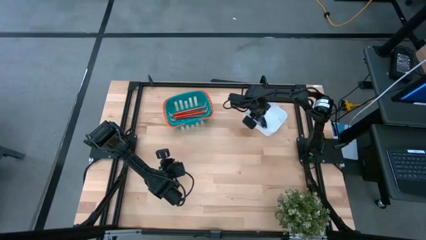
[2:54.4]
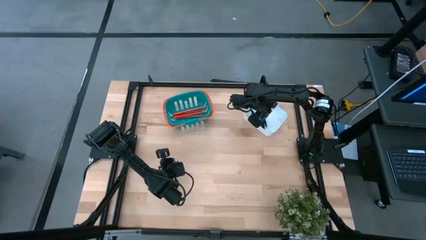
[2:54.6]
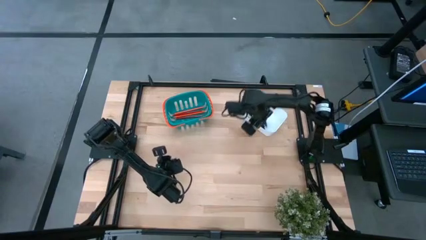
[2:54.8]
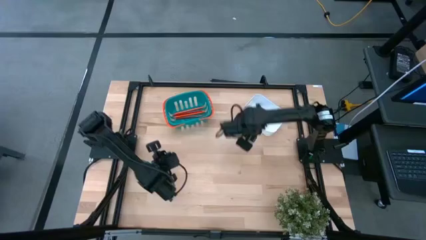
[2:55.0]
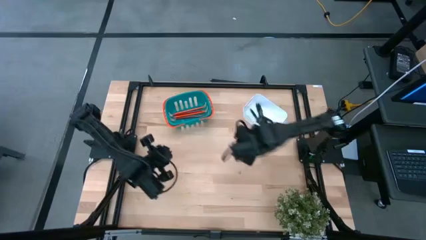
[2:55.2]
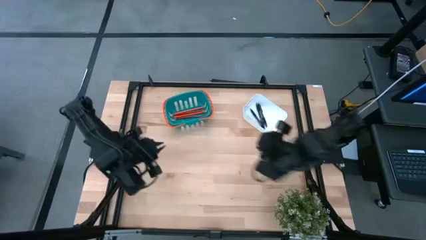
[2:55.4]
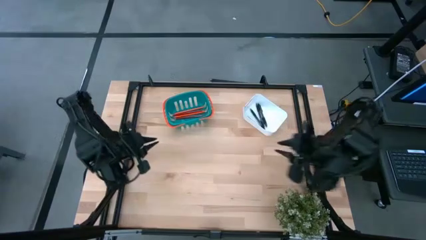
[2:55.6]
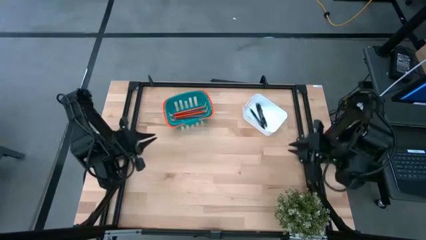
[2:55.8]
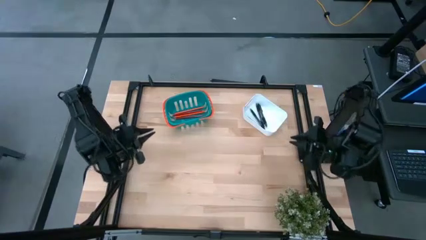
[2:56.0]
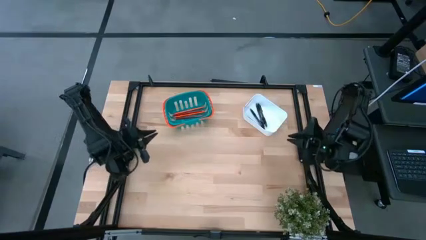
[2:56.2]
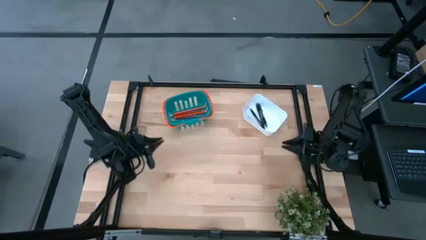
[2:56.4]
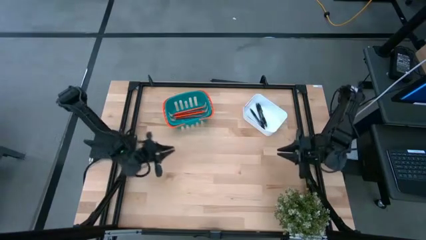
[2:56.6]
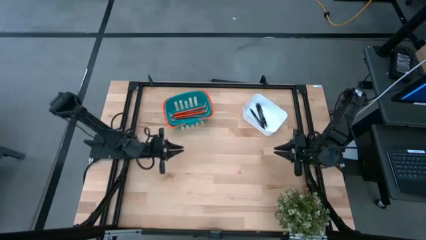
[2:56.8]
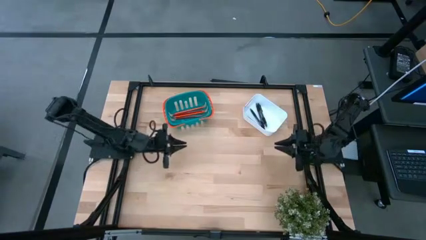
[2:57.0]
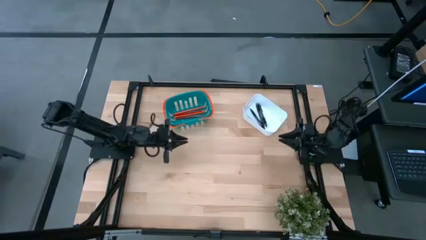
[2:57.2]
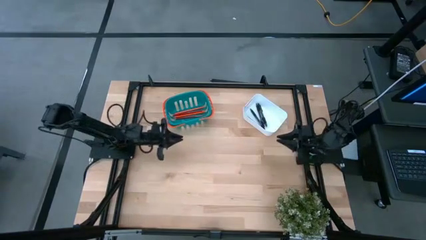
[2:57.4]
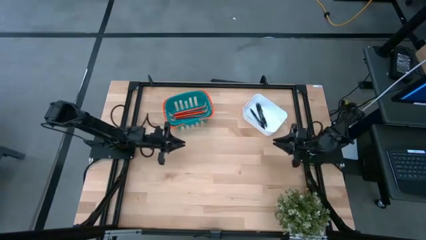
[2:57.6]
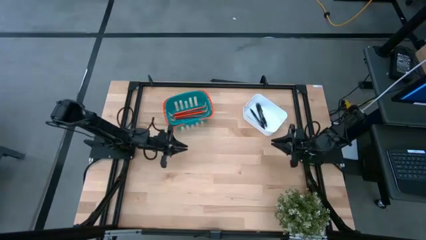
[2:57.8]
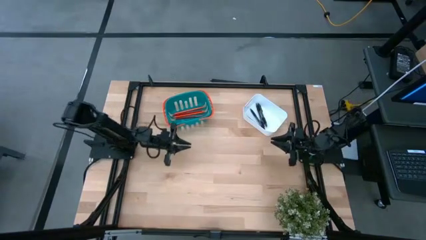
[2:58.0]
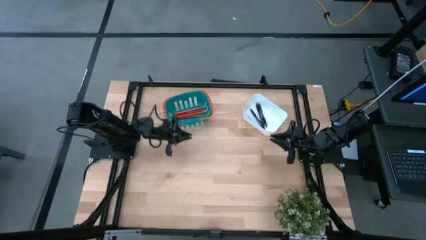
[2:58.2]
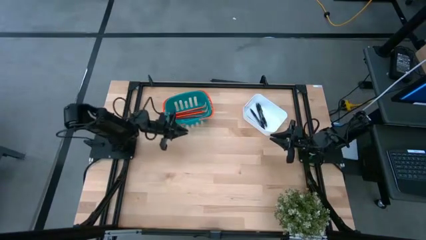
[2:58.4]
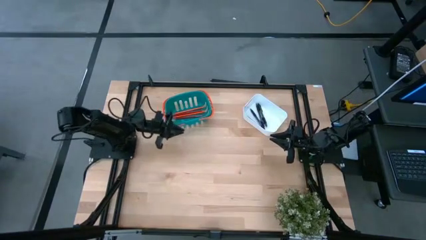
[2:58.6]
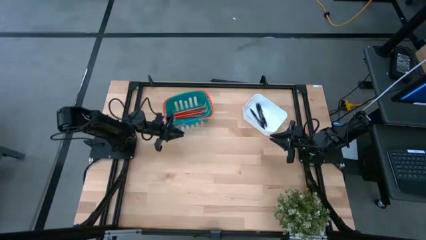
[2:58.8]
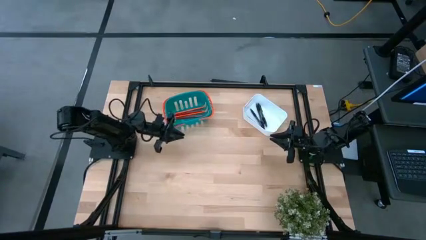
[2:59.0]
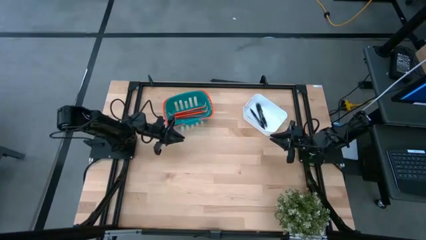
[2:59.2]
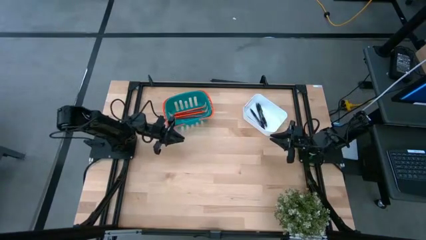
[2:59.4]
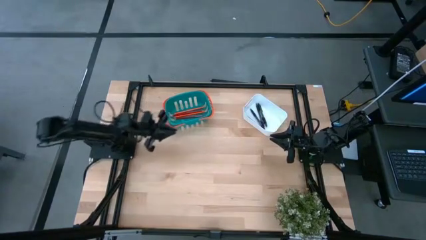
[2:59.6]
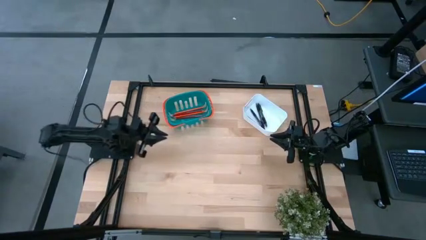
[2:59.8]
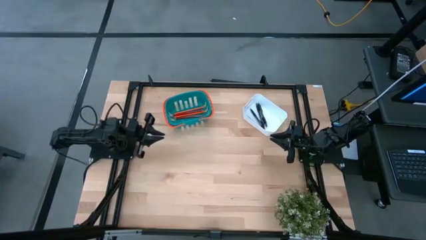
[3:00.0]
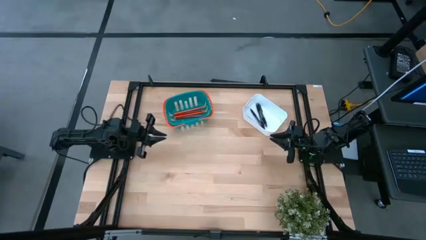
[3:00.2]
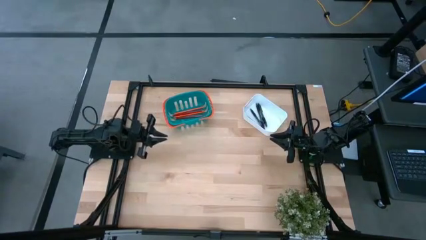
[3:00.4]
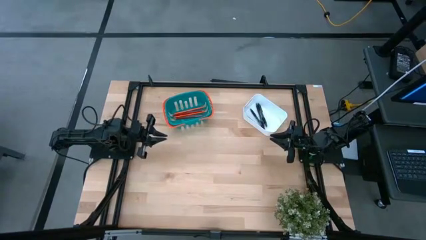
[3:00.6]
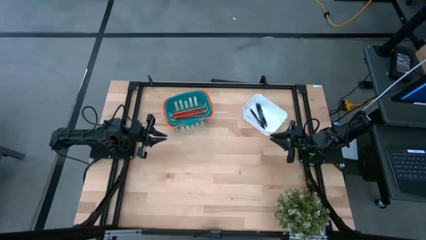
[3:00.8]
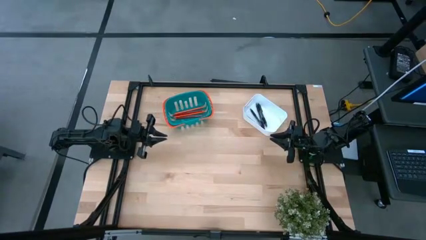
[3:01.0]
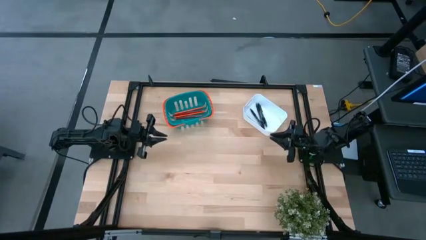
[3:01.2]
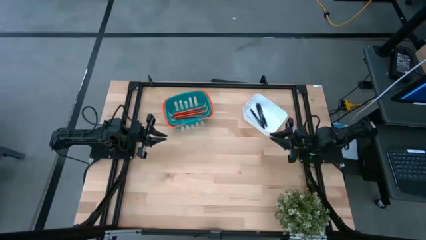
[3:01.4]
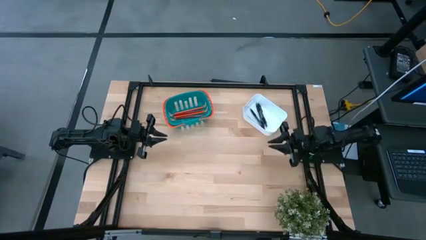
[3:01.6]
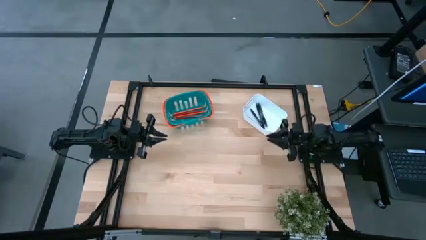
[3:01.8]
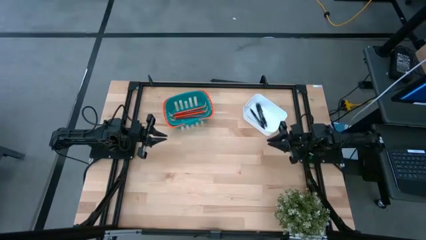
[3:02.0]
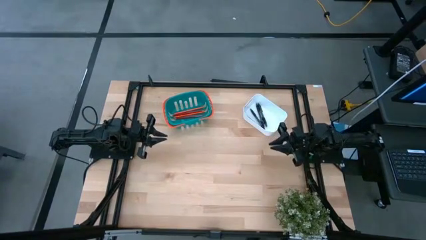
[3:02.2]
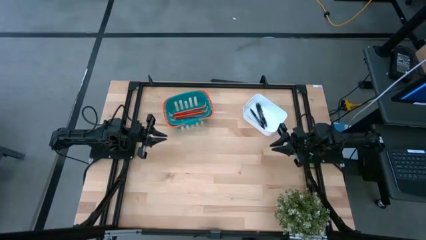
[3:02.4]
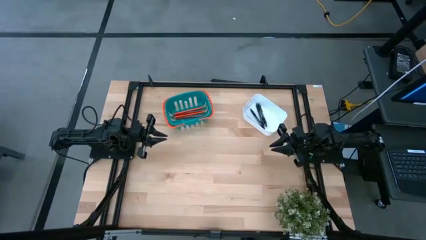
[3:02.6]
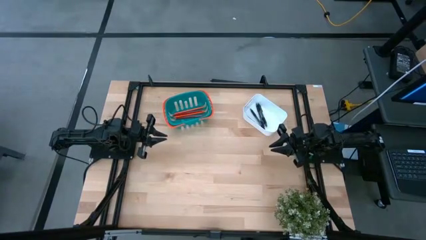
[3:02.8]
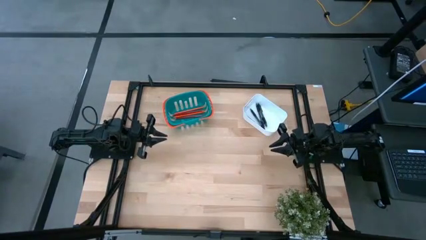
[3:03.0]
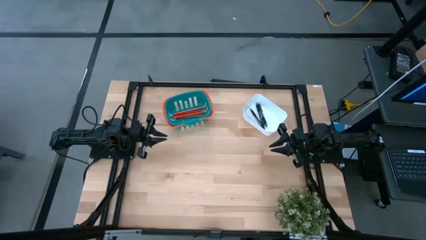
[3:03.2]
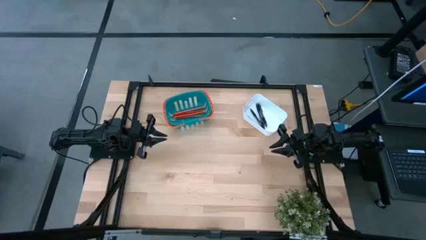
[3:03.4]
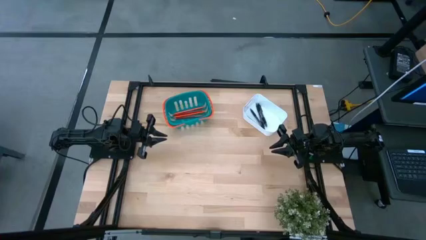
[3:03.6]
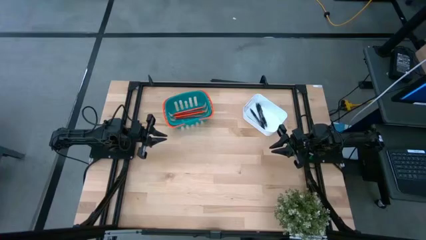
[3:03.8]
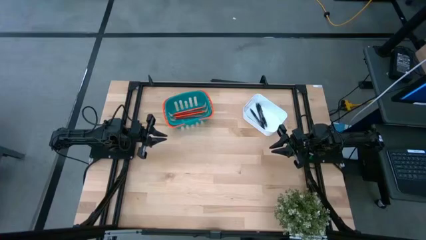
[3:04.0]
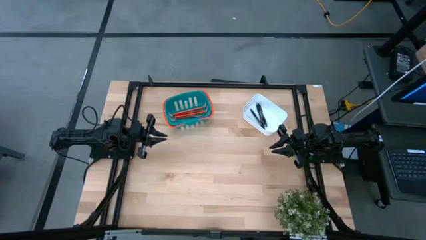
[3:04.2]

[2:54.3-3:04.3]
Task: Sort pens & pencils
Return to Home Position

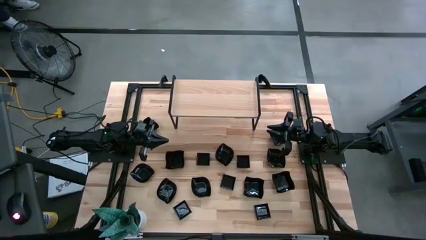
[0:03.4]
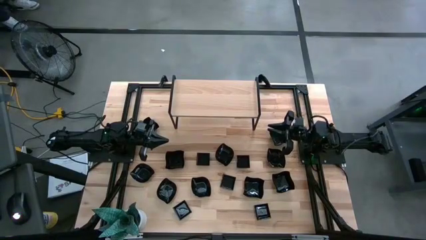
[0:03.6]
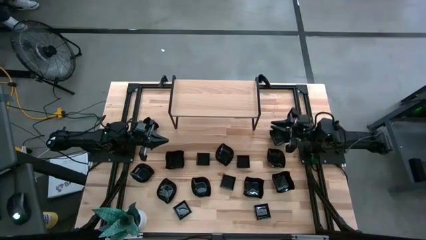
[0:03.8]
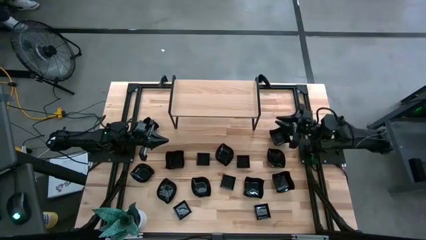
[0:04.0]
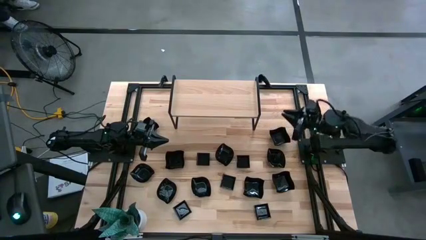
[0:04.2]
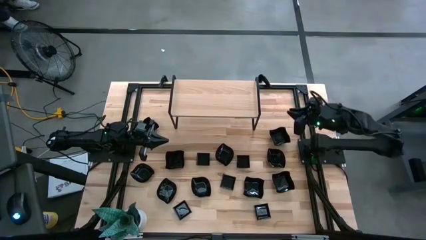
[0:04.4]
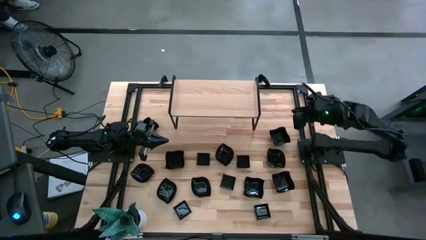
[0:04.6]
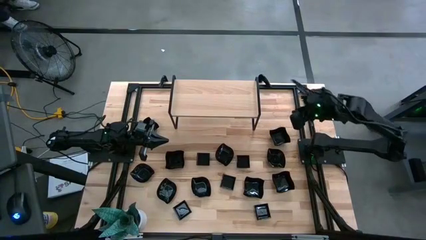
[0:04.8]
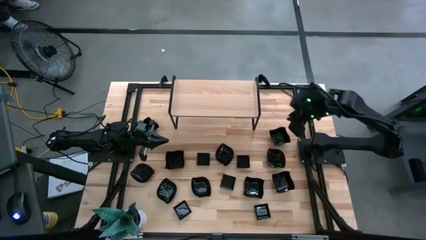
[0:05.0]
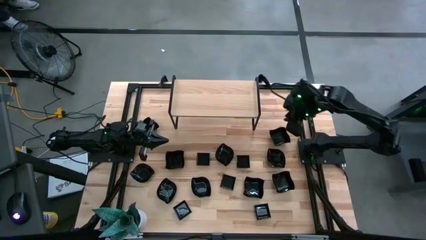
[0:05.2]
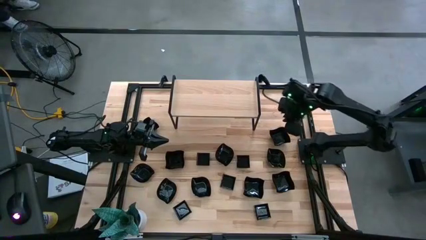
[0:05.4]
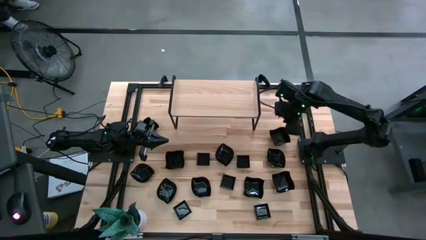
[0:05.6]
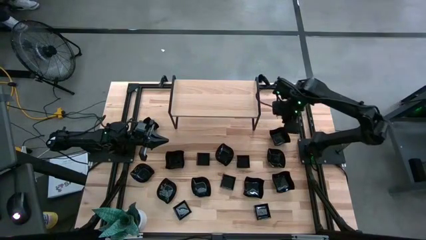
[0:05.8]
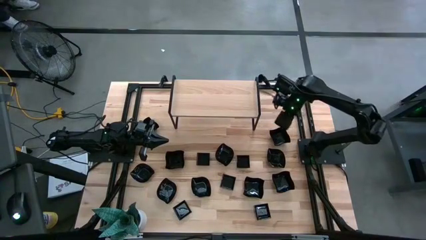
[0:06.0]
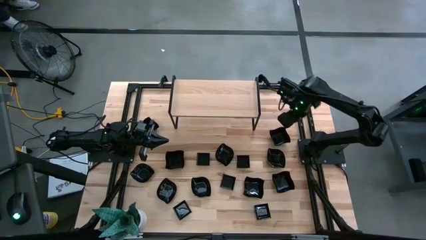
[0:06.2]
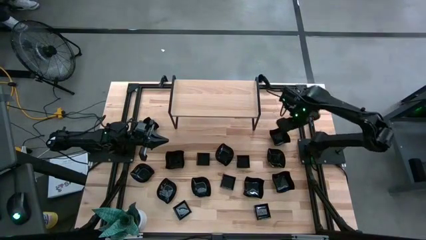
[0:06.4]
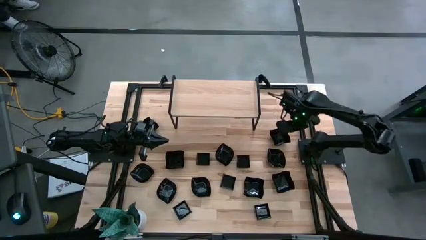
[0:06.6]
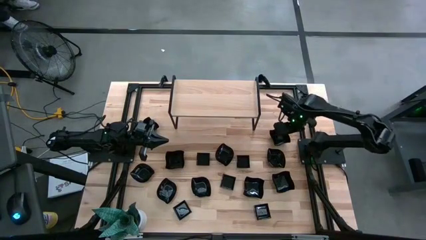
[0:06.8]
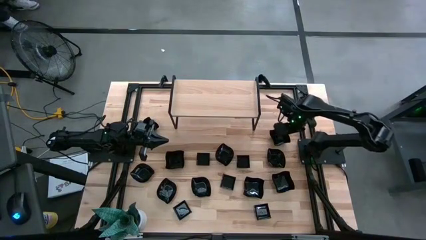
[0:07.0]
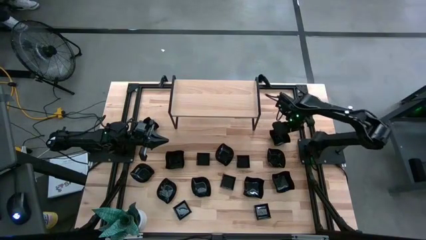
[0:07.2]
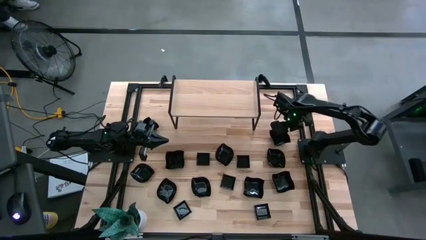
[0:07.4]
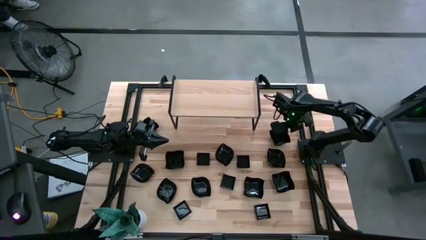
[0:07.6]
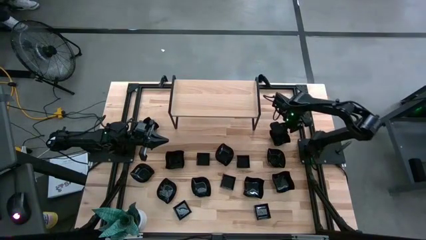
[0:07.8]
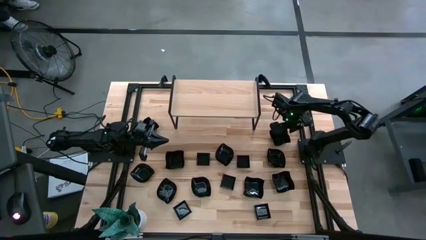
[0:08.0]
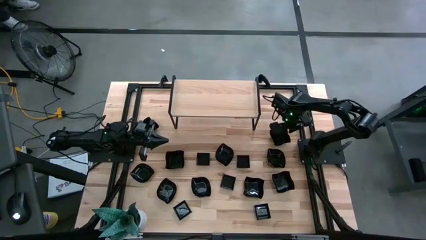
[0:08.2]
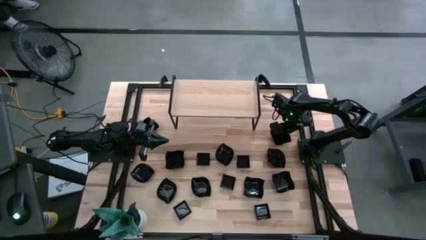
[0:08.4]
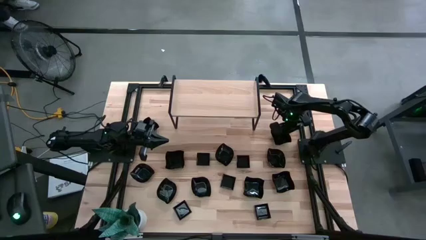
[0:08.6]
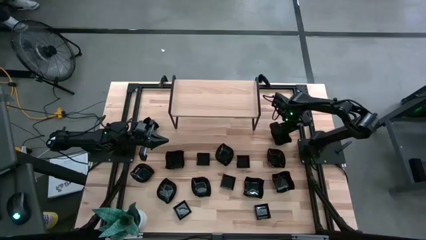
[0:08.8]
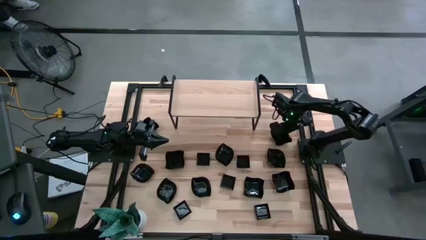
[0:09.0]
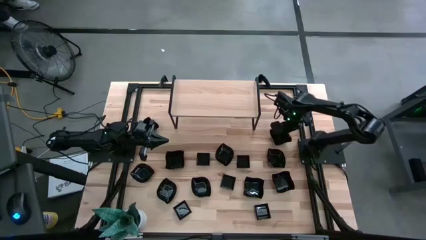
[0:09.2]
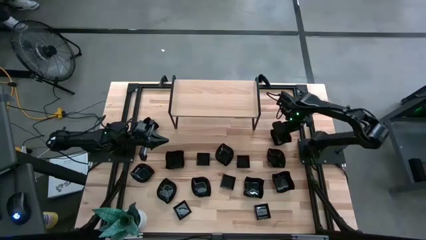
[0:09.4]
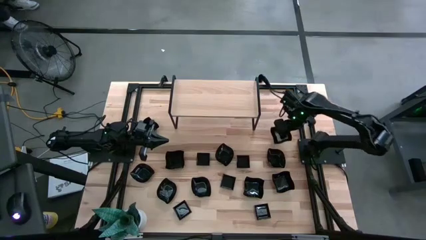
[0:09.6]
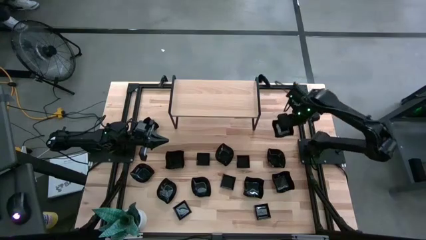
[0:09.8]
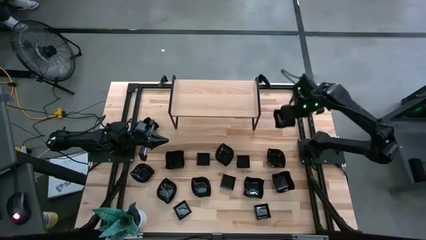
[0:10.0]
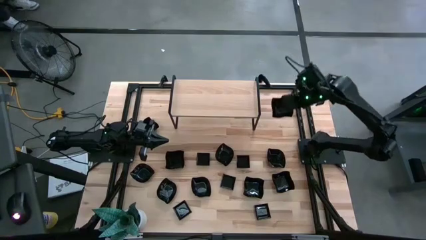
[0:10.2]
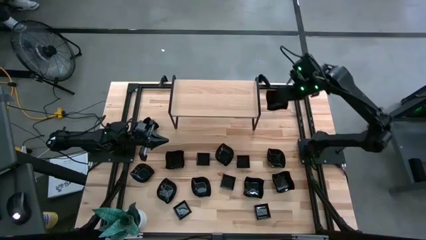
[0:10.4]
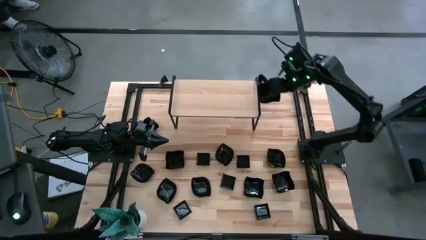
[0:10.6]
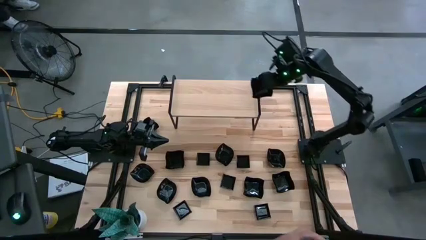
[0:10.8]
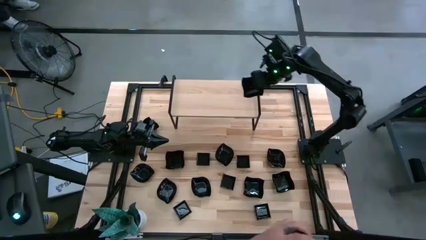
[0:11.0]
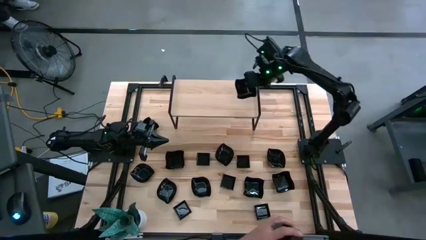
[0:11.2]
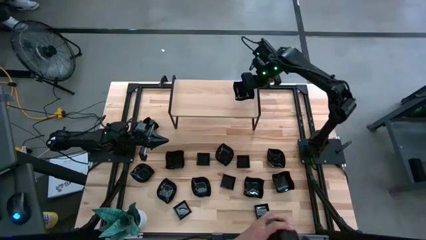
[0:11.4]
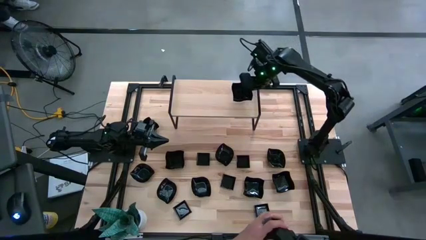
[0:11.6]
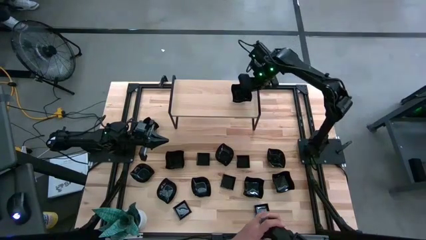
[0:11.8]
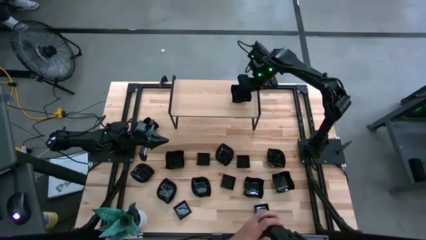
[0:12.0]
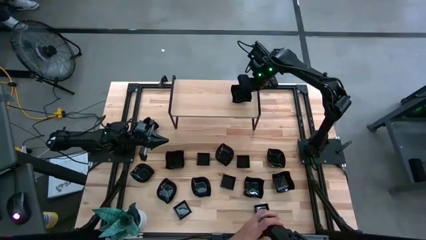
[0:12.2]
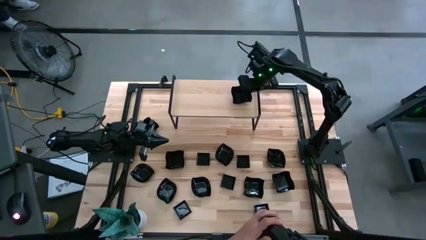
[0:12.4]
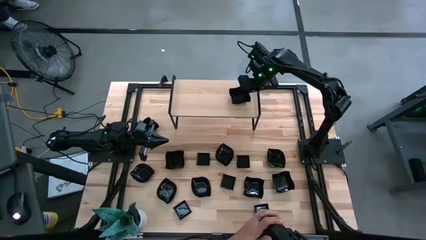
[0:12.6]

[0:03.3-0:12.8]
Task: Pick & Place Mini shaped plates
Put the distorted square-shaped plate on the shelf
